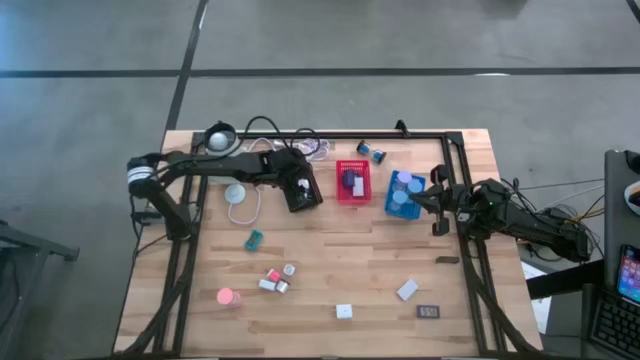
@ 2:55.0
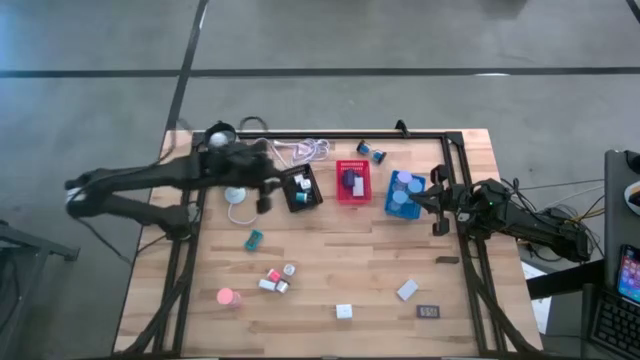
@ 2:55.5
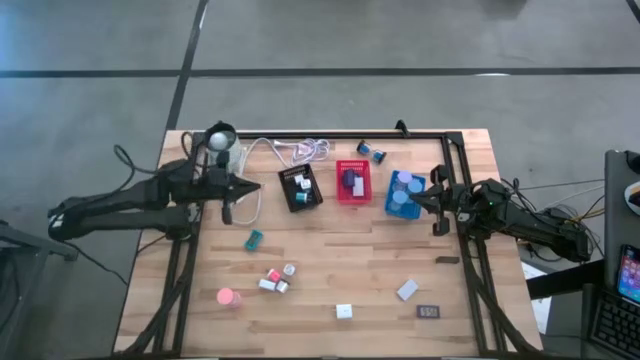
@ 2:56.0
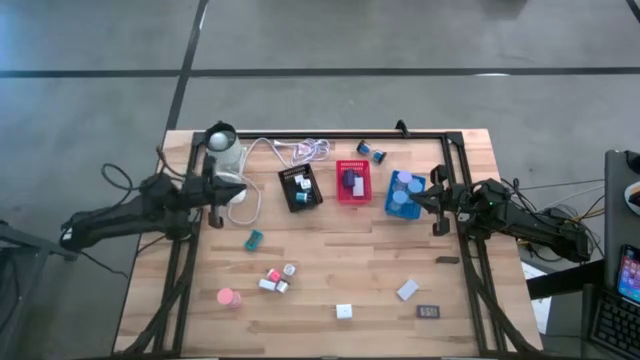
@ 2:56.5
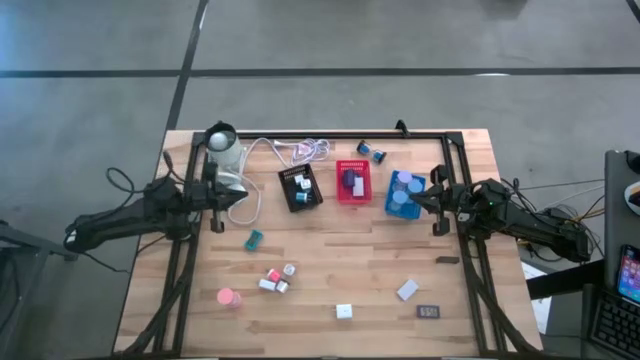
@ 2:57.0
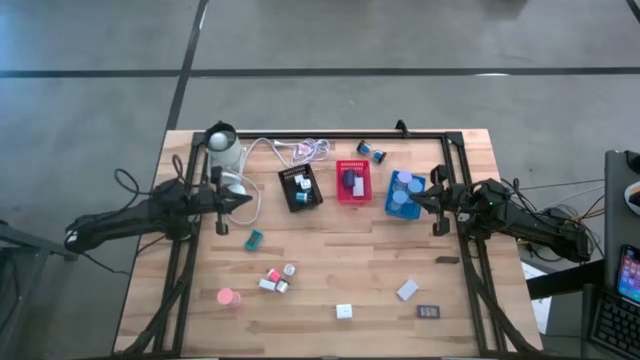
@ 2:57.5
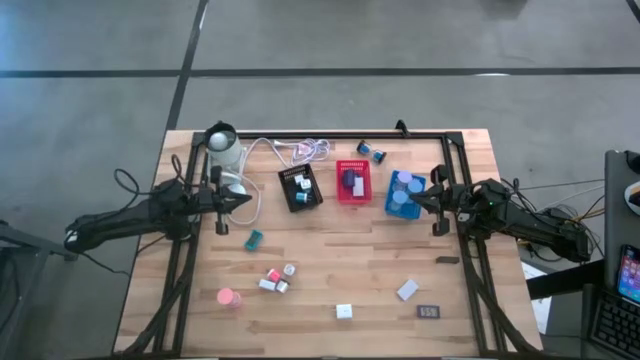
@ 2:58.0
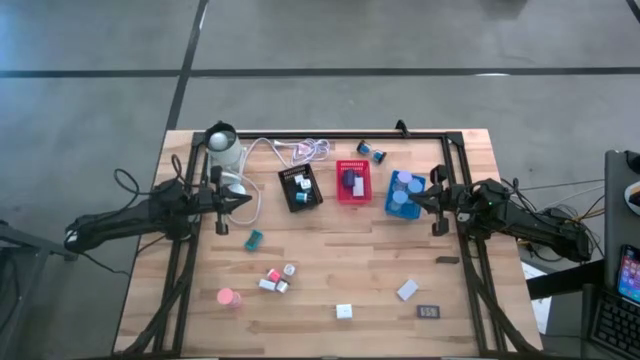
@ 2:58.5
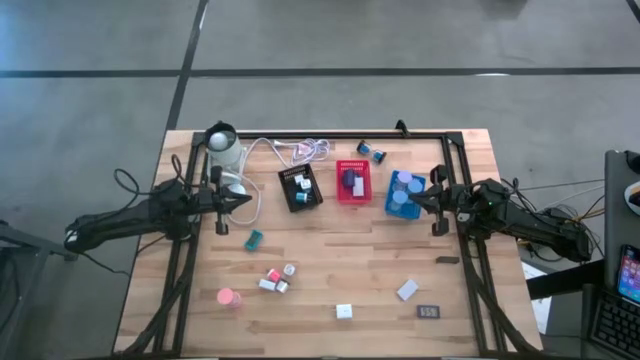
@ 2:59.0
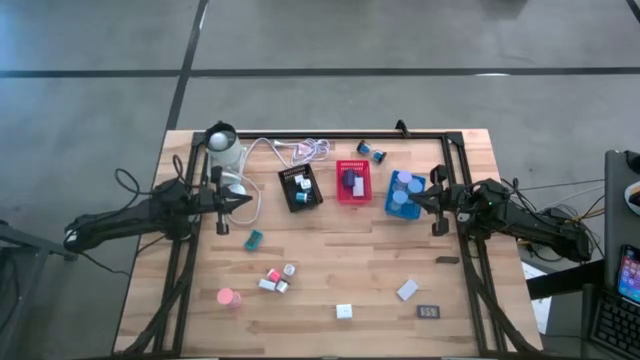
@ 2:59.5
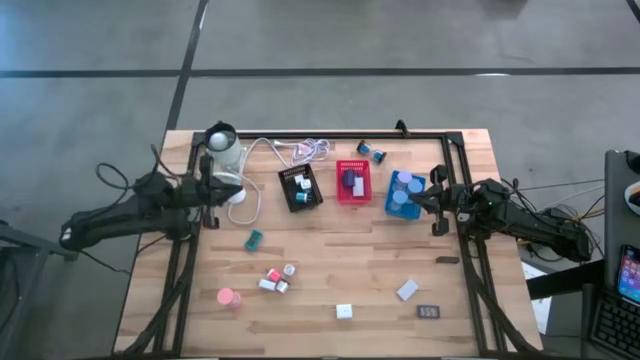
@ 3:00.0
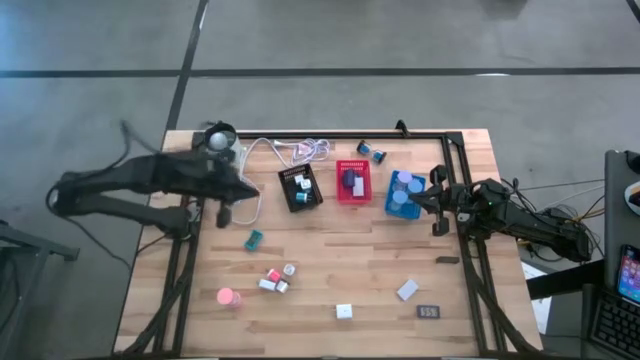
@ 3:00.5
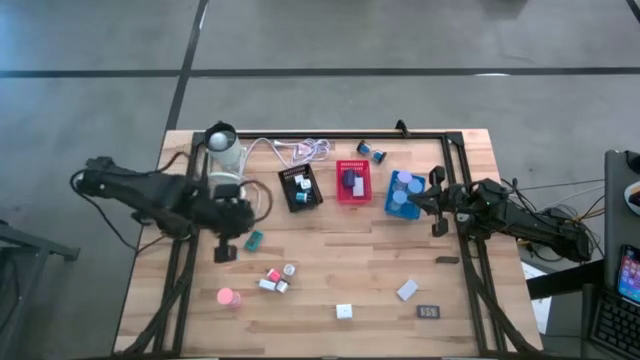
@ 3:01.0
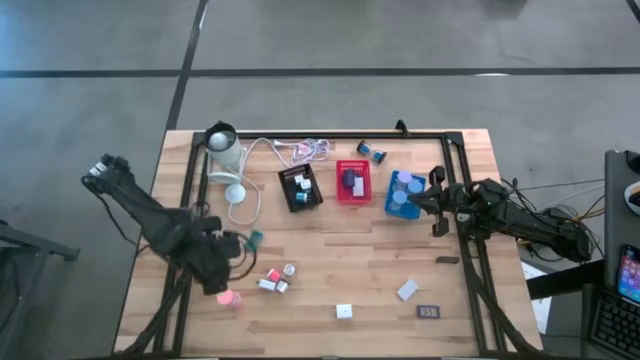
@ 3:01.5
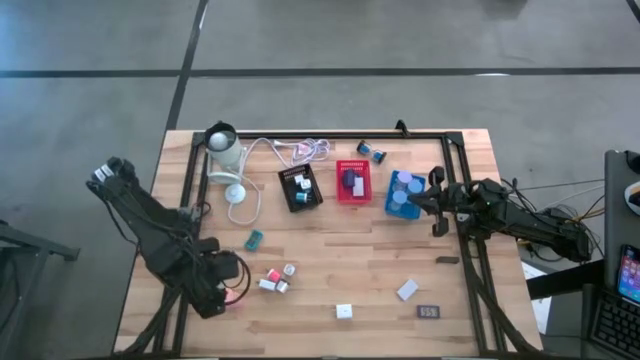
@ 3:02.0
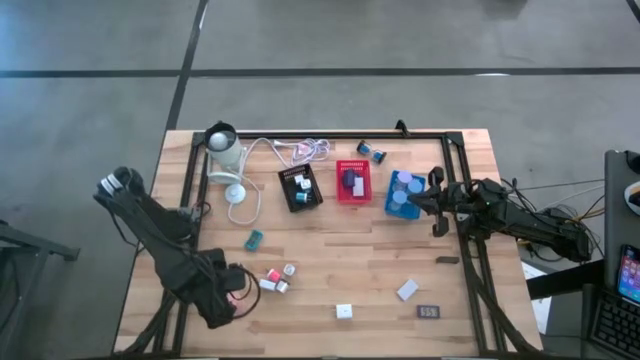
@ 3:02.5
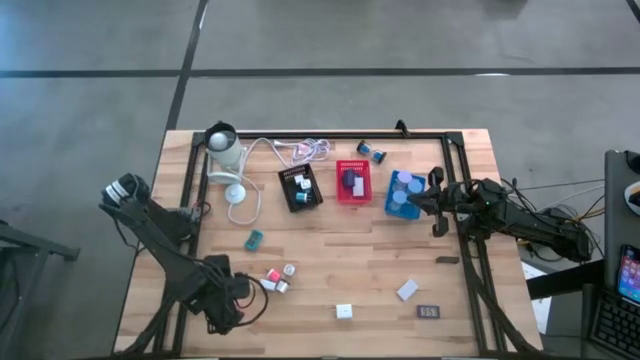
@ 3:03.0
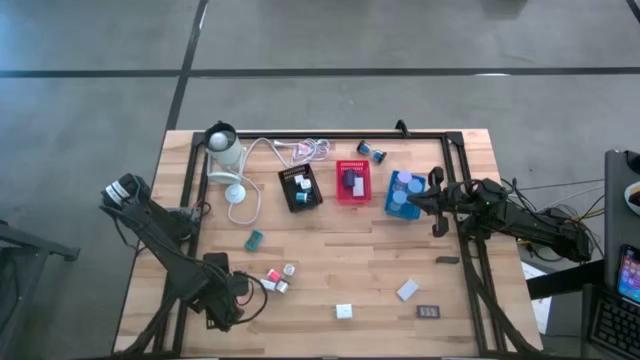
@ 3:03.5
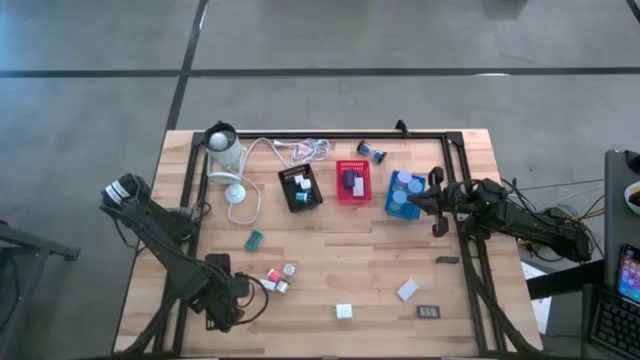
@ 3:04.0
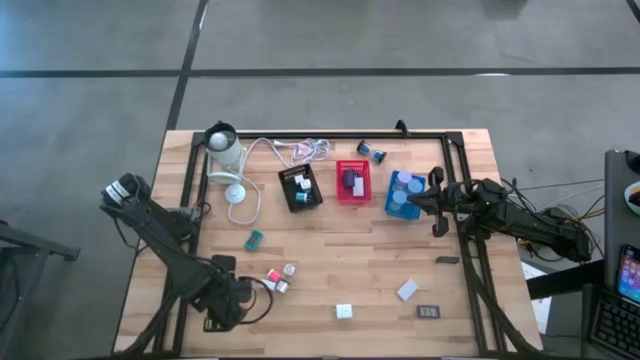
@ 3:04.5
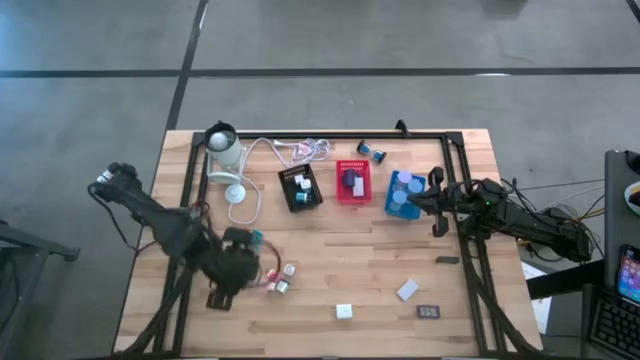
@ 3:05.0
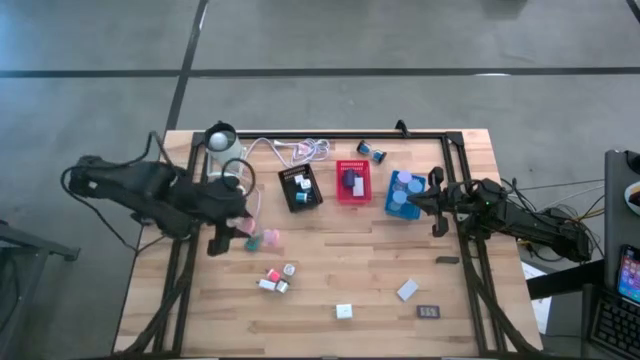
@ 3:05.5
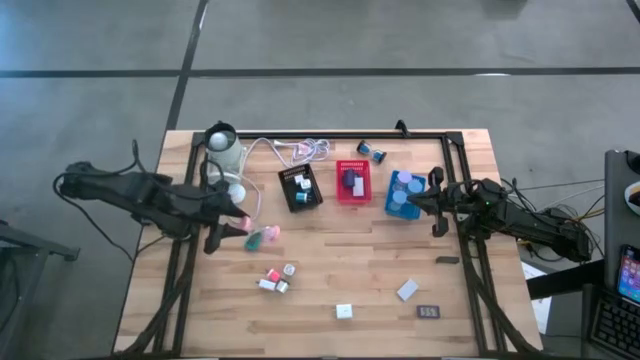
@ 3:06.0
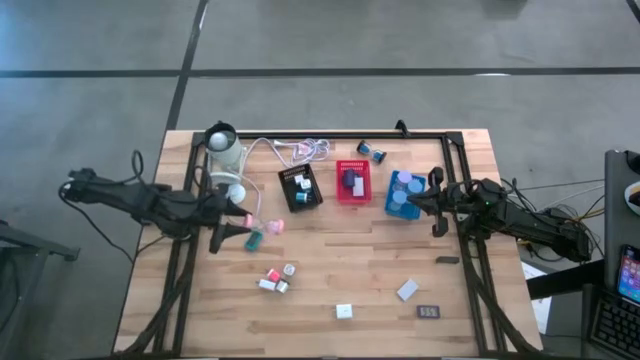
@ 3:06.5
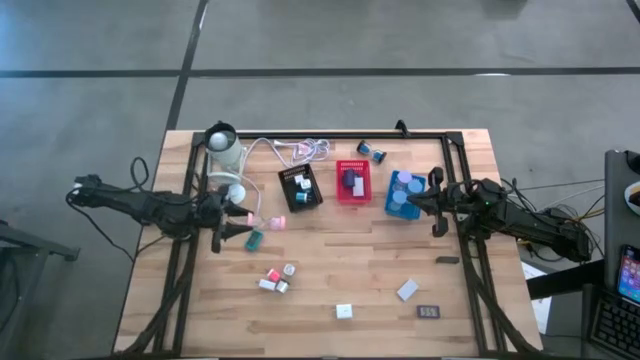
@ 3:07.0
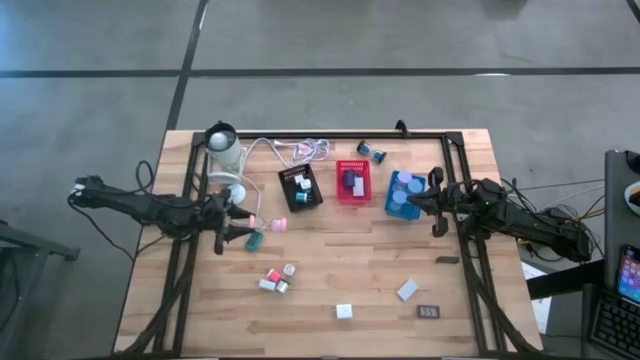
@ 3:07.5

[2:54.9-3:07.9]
Task: Pick & Place Office items
Put the pink hourglass into the blue bin

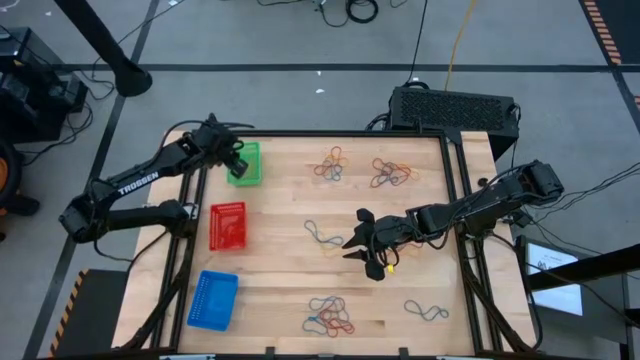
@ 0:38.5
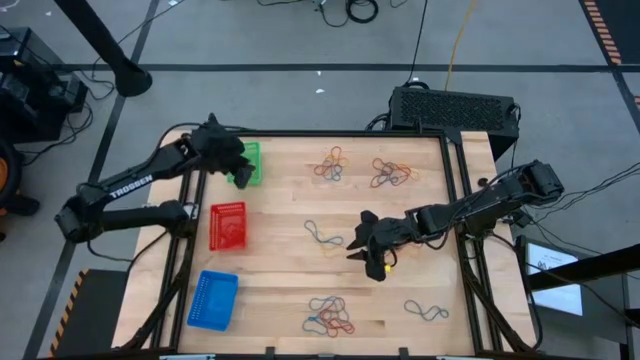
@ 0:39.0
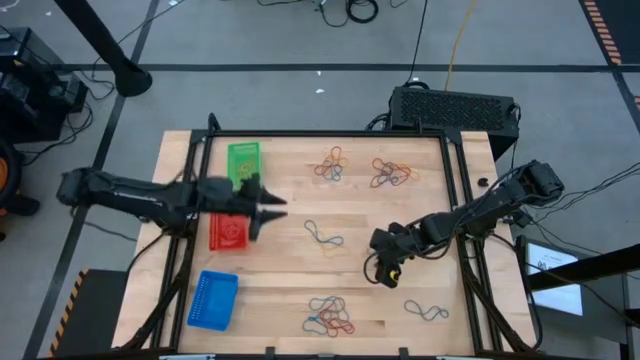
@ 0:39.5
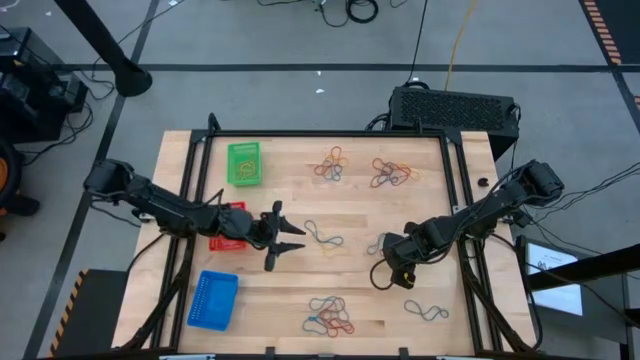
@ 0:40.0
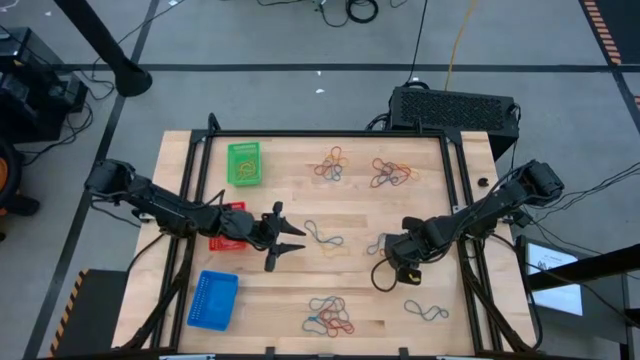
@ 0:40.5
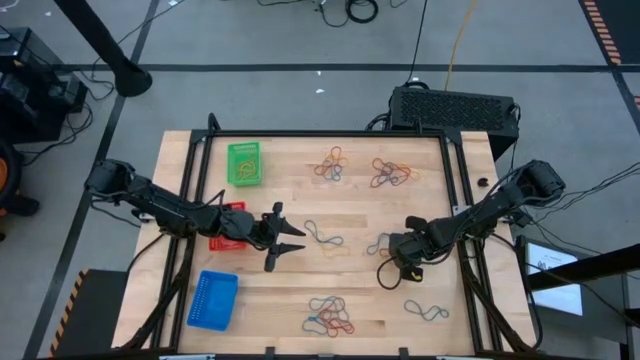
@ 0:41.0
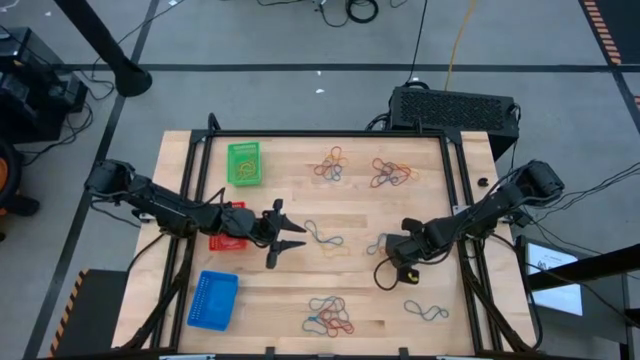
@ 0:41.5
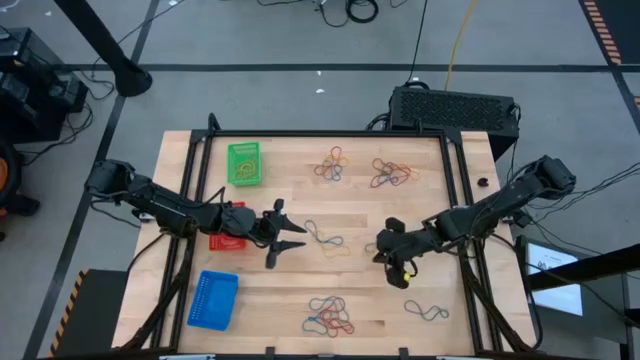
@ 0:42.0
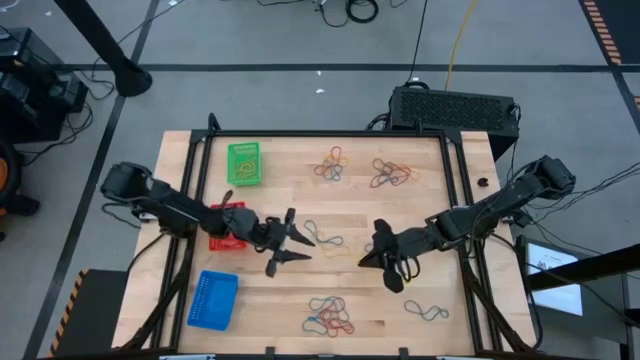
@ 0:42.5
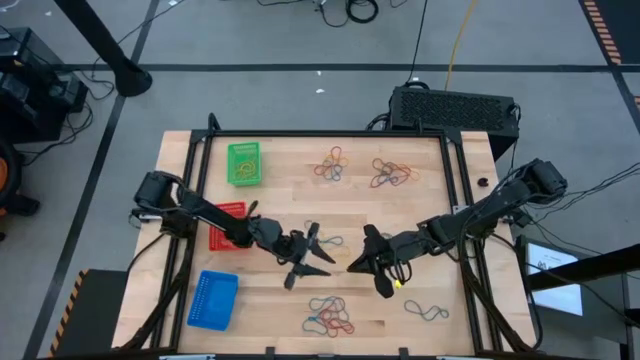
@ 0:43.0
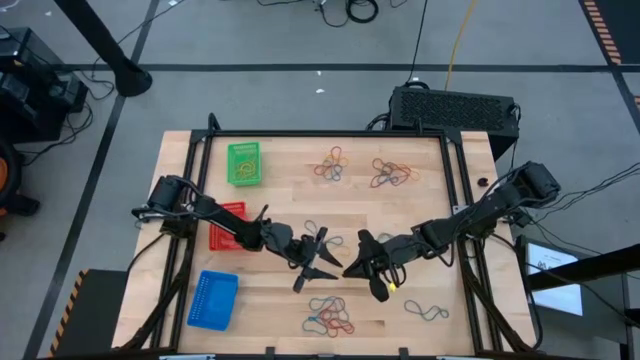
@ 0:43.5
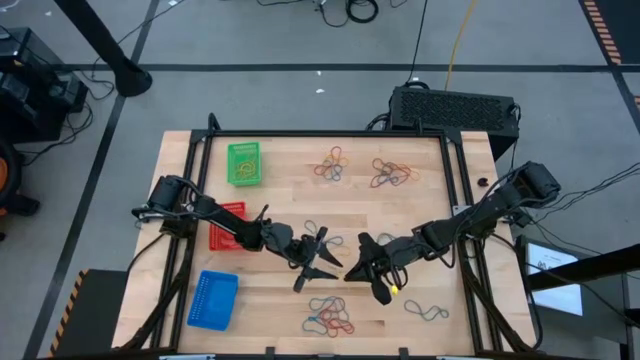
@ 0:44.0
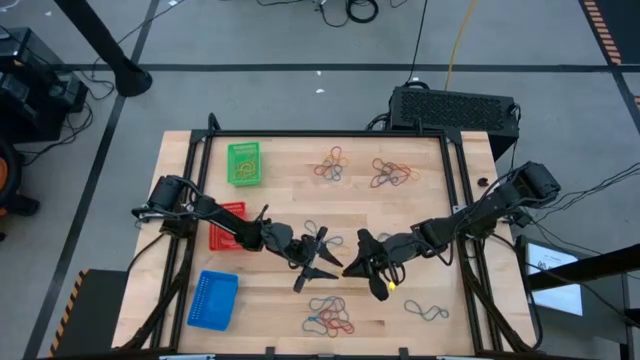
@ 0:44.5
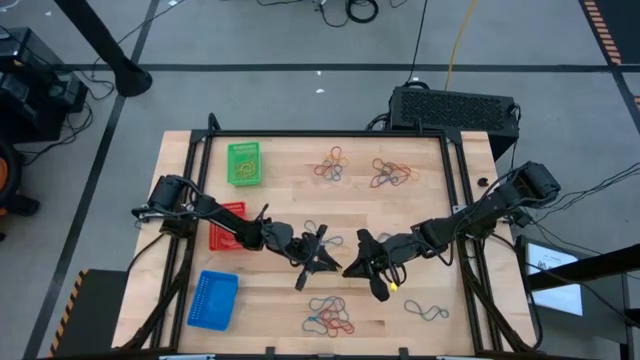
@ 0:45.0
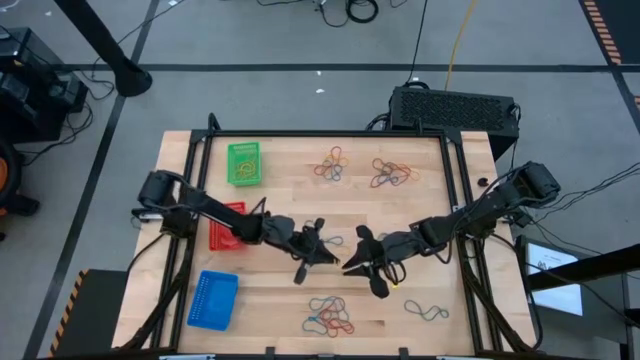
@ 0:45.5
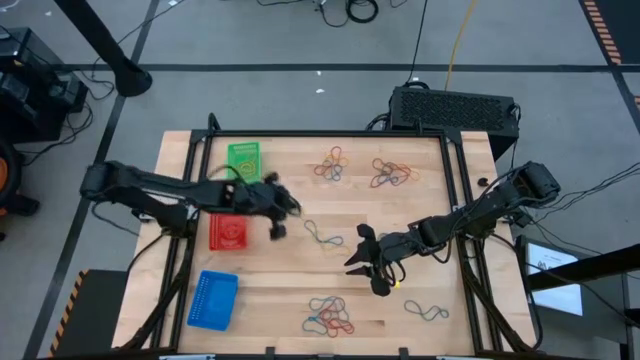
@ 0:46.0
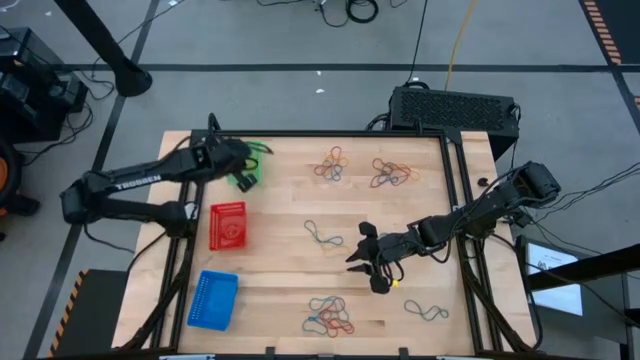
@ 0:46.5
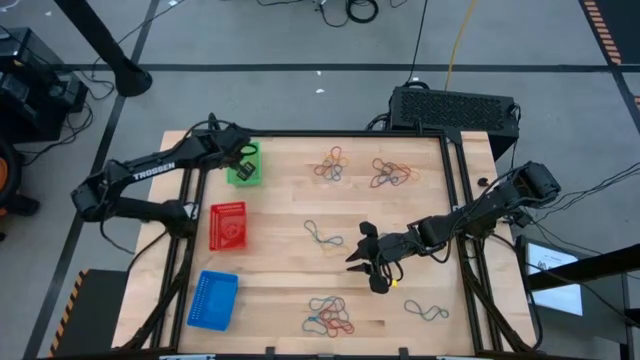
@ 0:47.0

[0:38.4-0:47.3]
Task: Sort rubber bands into baskets
Put the yellow rubber band into the green bin
